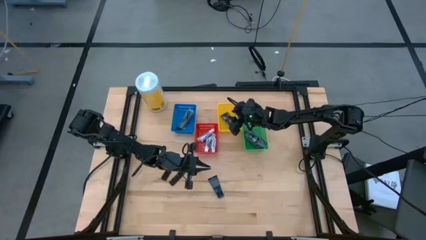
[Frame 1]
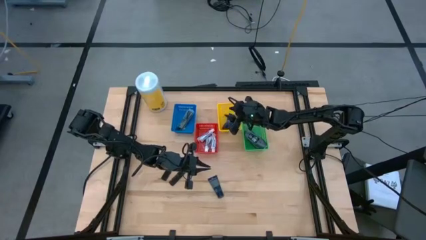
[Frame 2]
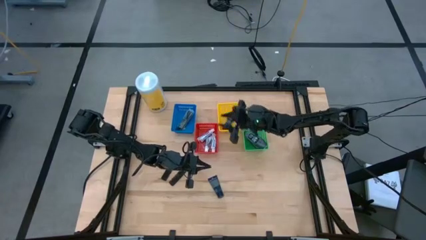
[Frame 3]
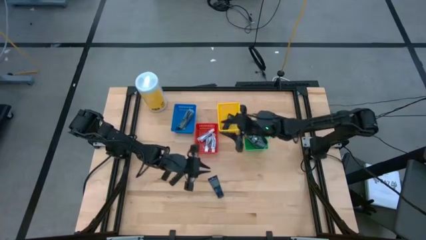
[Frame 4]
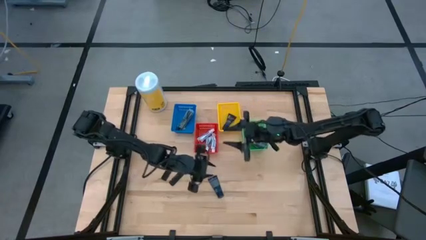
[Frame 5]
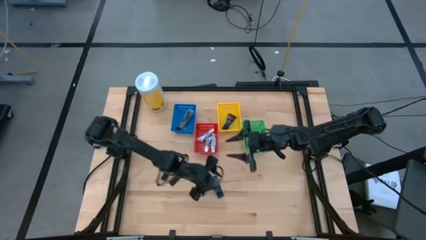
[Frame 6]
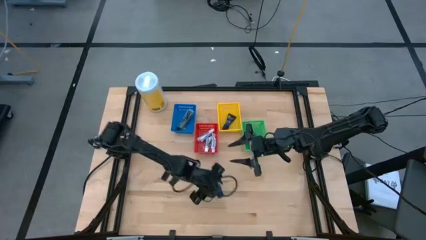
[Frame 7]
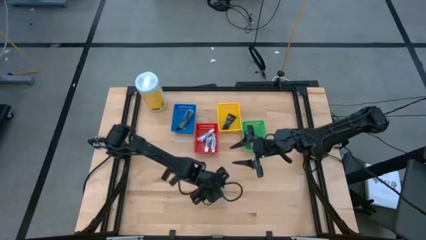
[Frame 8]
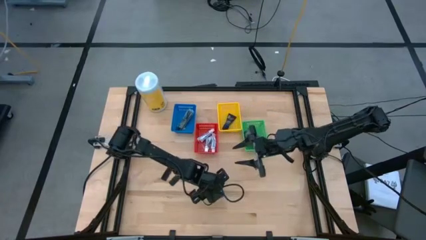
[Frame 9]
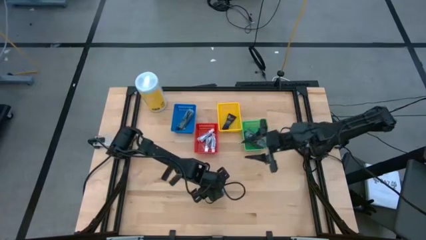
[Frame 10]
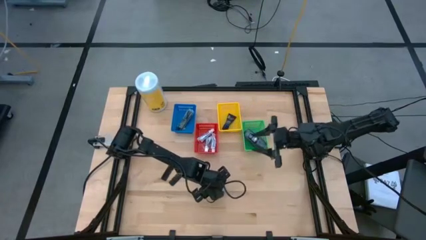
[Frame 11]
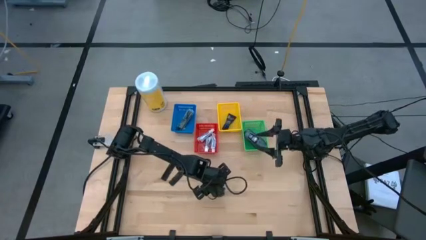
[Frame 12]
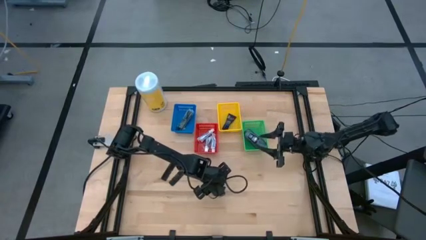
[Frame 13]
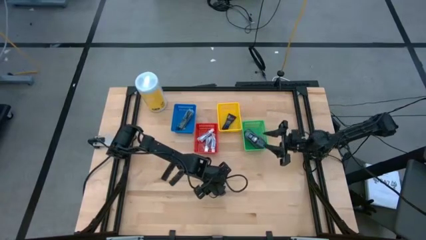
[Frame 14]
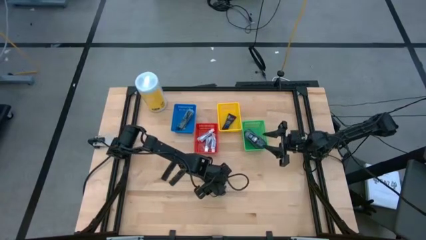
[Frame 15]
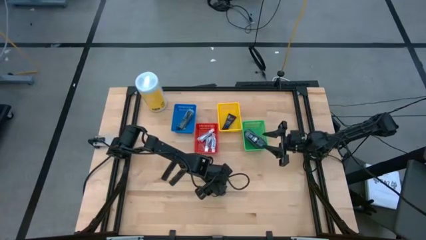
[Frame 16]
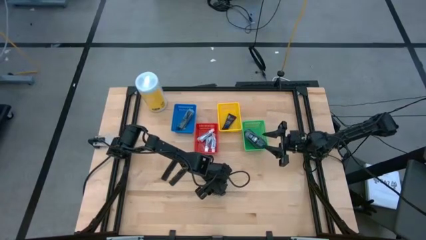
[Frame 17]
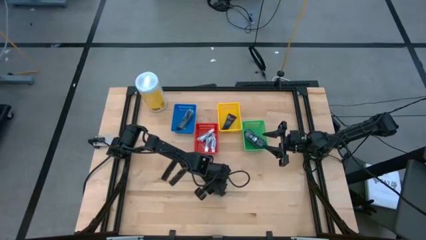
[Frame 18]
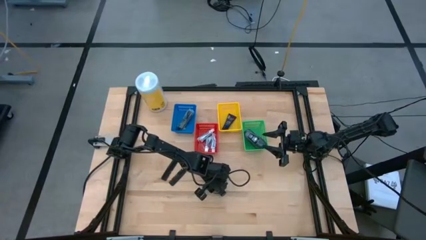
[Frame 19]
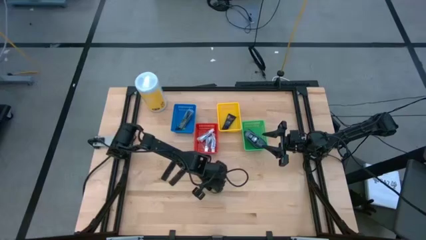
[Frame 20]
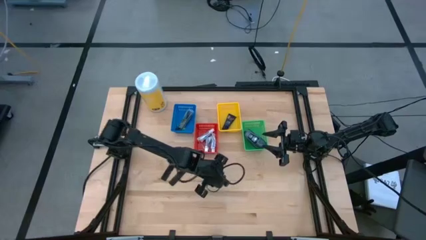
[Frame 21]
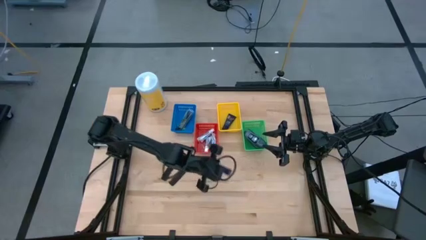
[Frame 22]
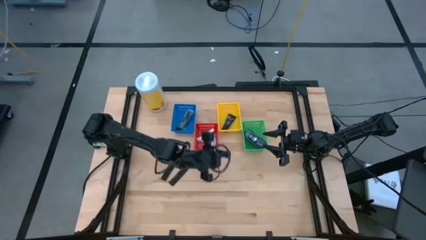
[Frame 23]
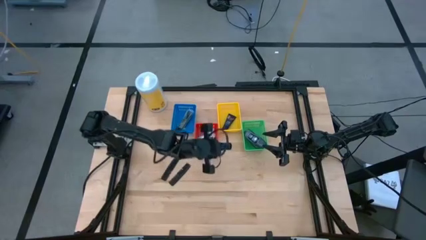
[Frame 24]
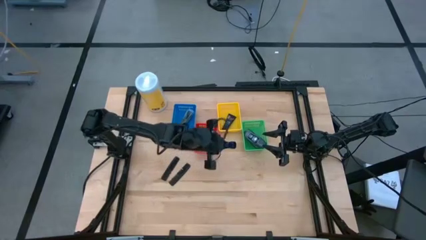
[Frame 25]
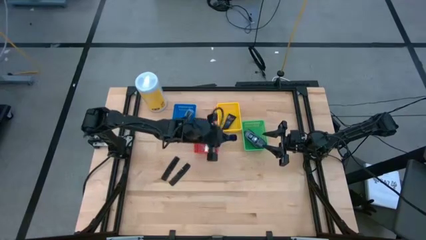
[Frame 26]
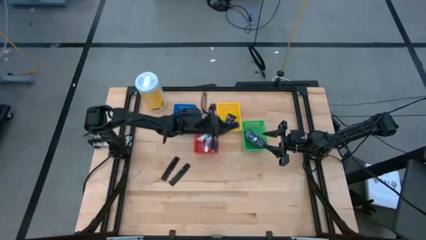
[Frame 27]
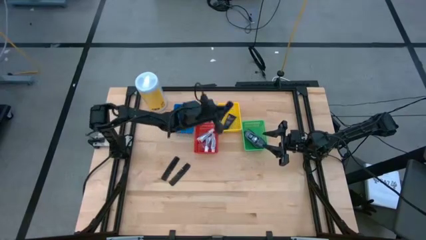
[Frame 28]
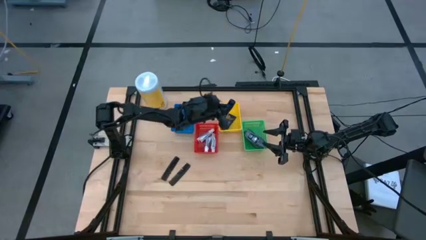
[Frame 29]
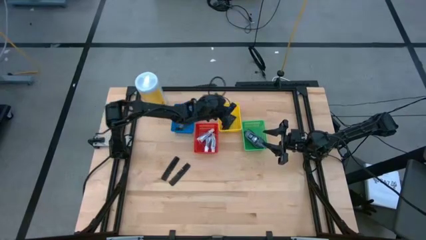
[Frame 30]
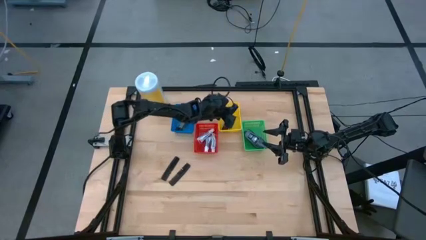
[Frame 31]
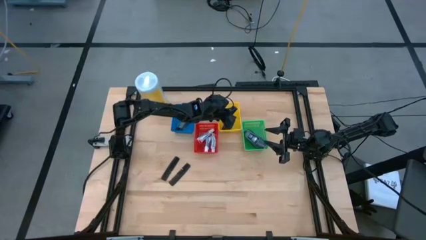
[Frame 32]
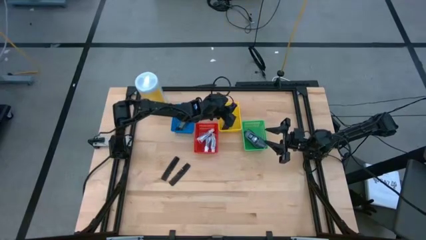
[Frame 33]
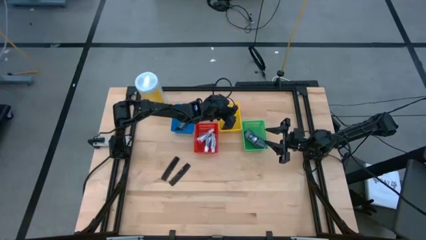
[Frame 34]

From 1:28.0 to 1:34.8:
Task: Pick & Place Travel size toiletries
Put the blue shaving cream into the yellow bin
